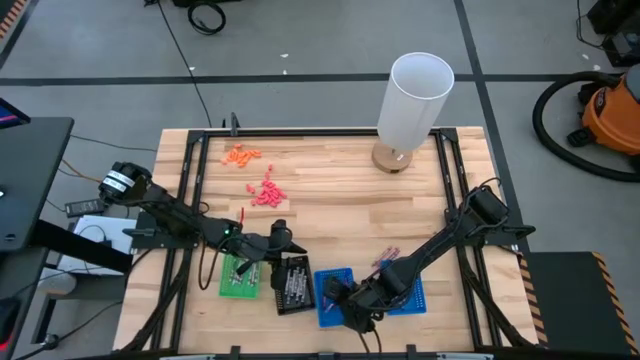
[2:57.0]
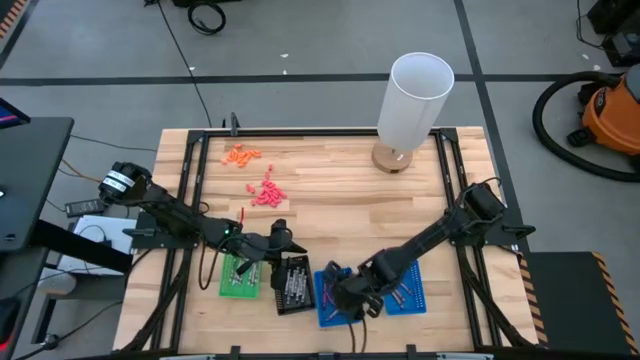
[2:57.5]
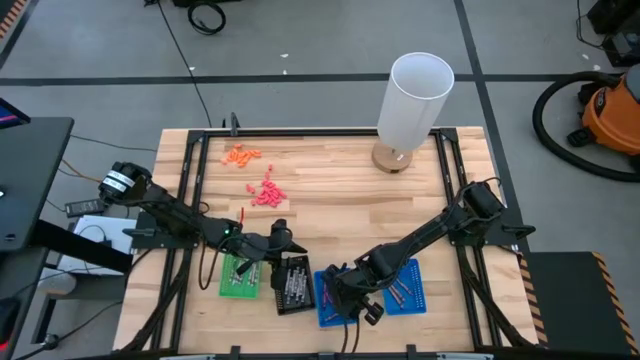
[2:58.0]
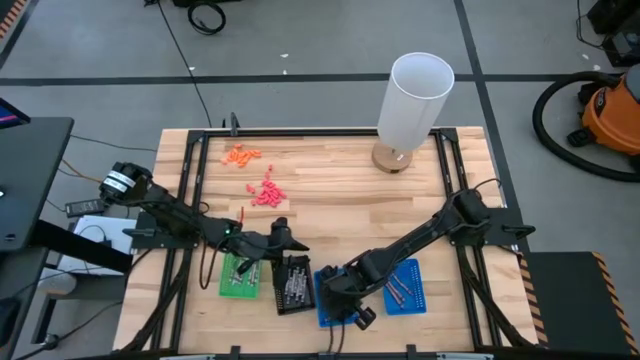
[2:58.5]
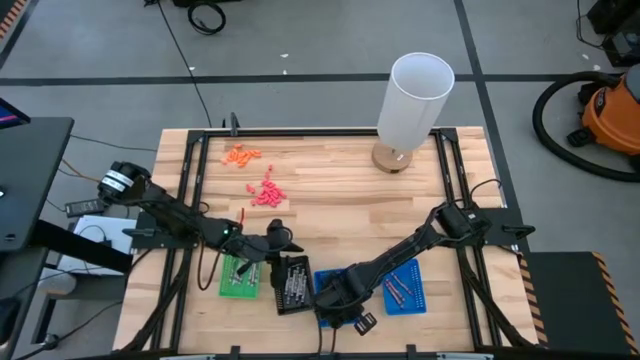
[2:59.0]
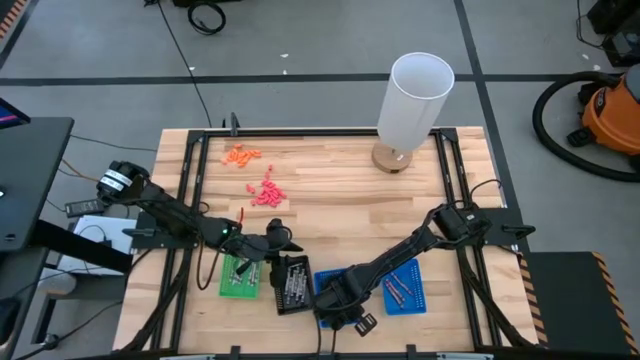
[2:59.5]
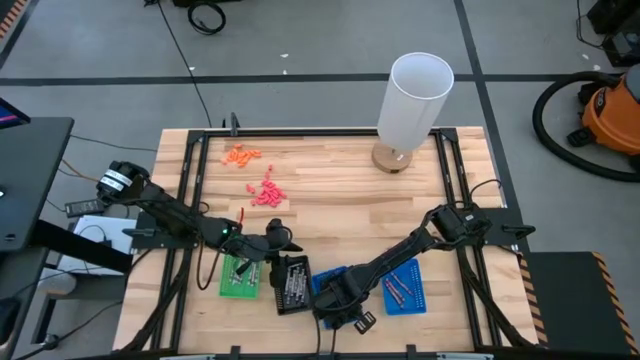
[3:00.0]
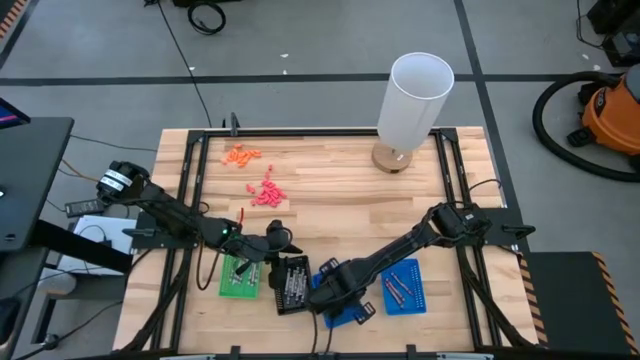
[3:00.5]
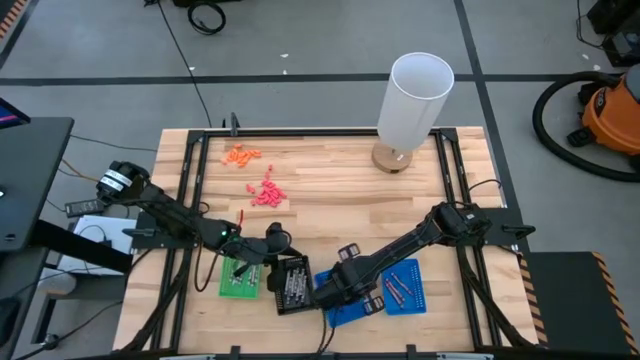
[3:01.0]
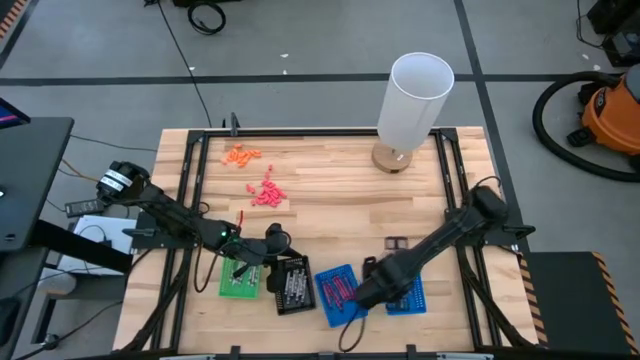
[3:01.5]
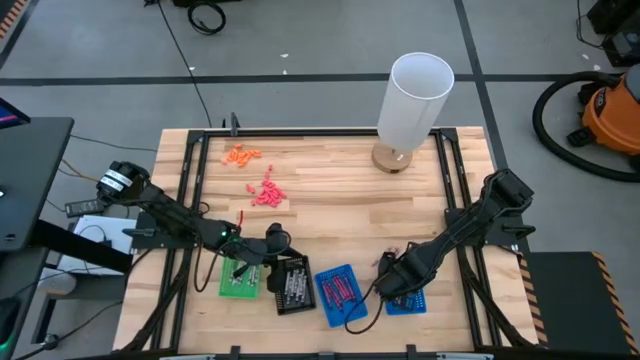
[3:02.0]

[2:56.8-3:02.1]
Task: Sort crayons
Put the pink crayon into the right blue bin

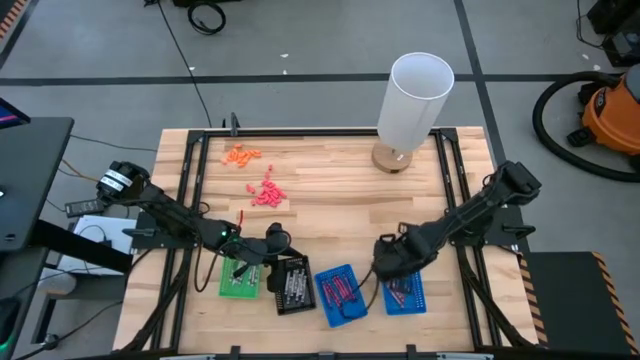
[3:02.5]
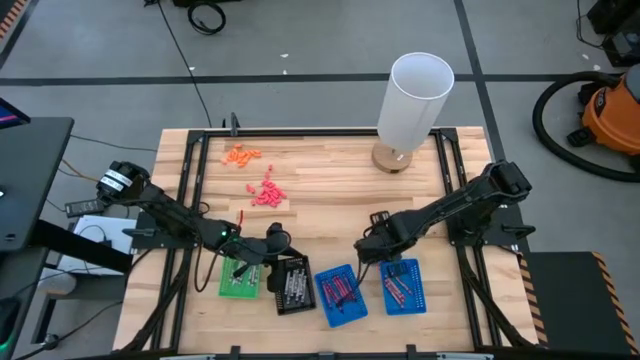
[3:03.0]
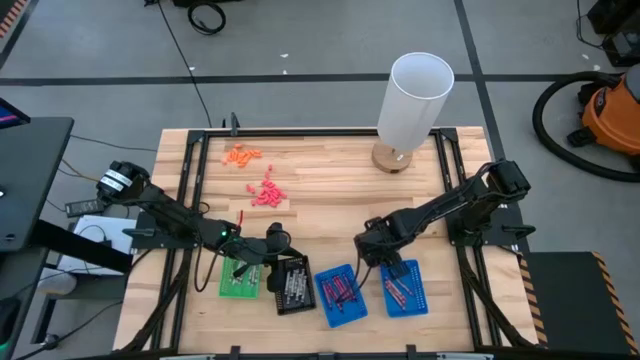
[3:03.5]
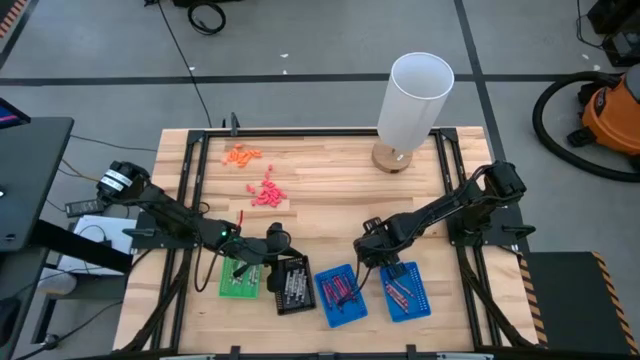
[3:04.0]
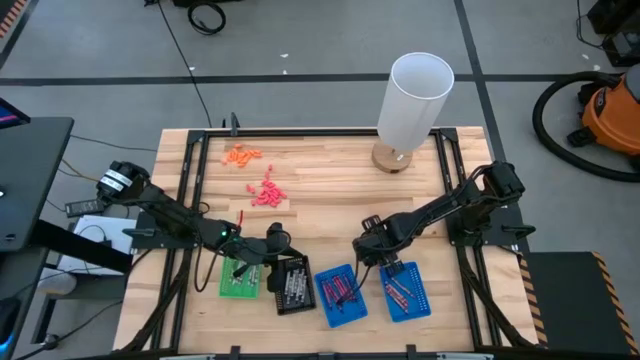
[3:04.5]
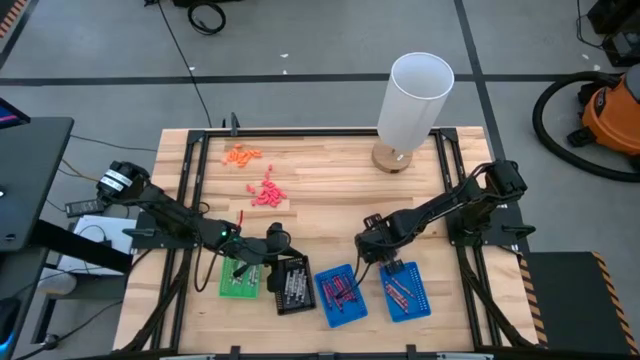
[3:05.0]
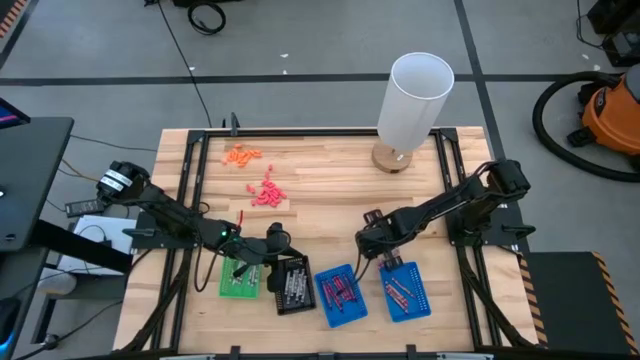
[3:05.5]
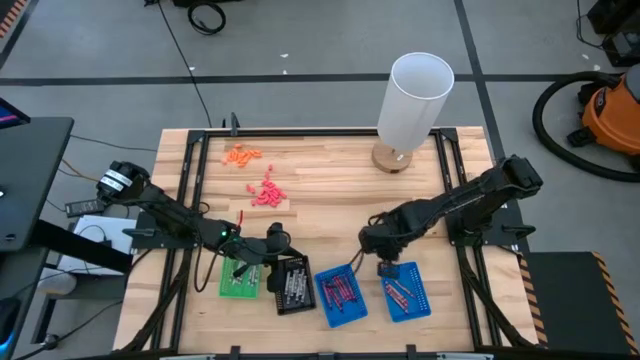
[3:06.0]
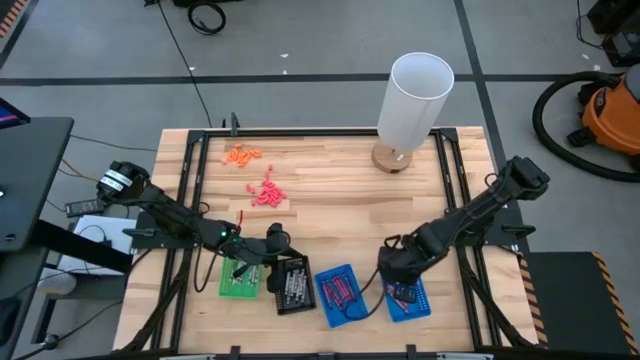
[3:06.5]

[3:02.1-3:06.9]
Put the pink crayon into the right blue bin

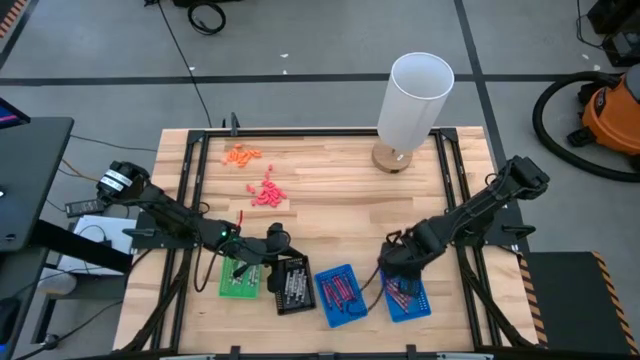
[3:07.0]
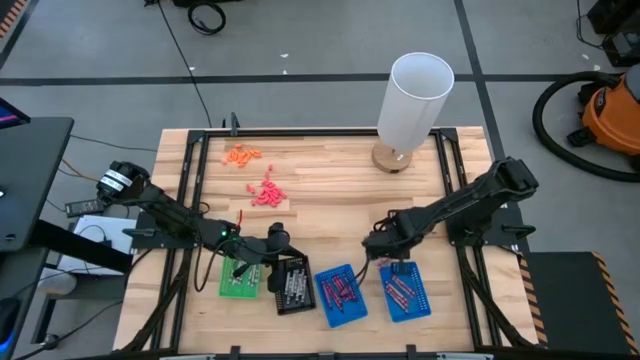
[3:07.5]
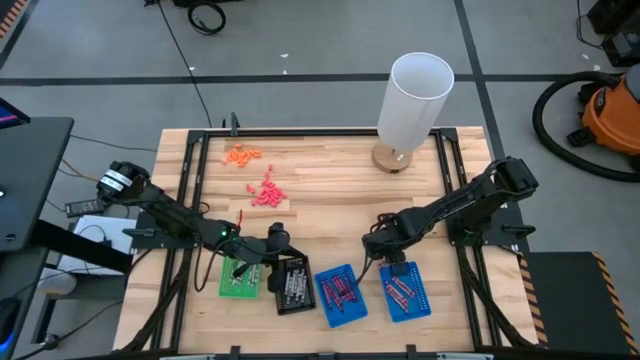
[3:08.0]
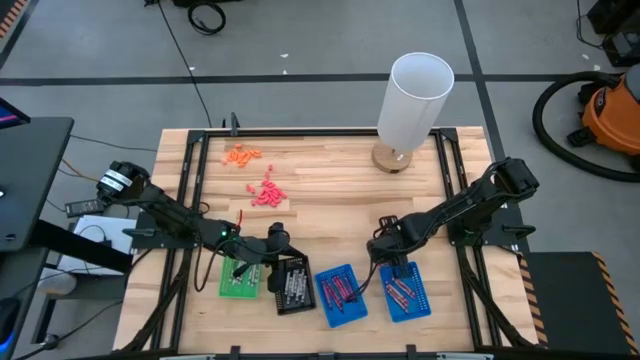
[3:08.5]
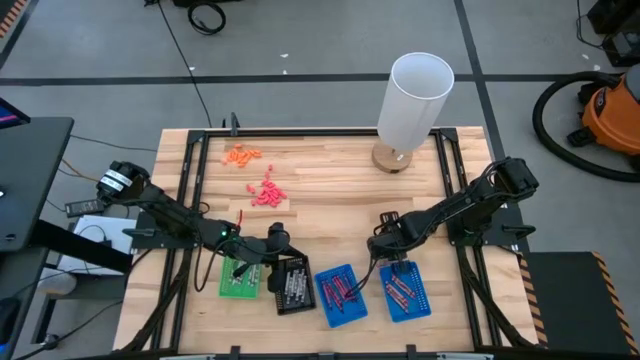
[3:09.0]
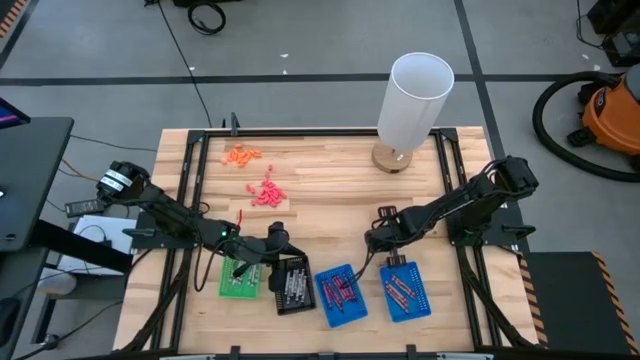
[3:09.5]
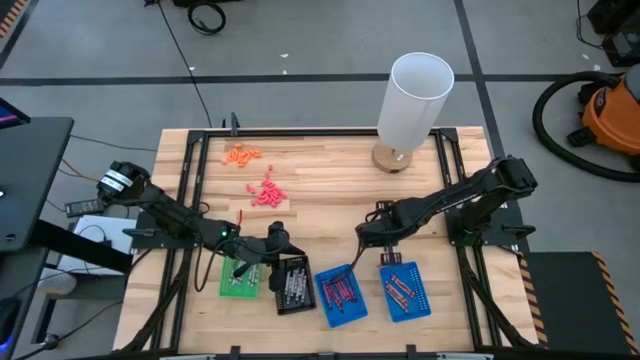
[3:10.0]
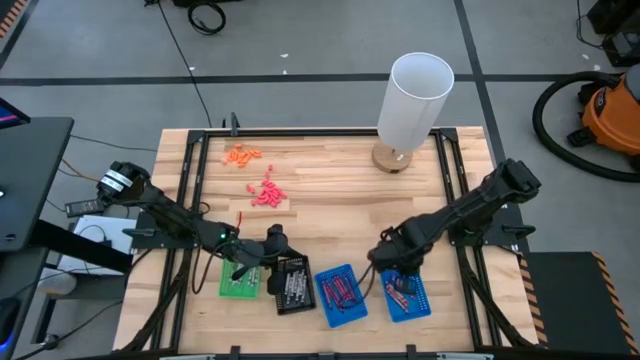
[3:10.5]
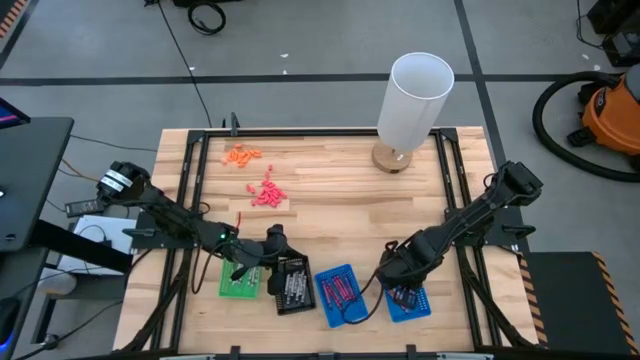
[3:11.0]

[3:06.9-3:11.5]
Put the pink crayon into the right blue bin

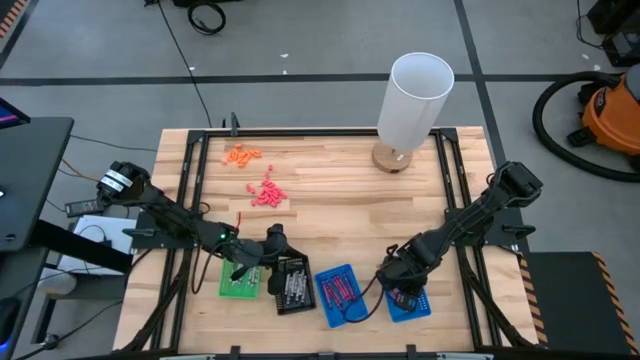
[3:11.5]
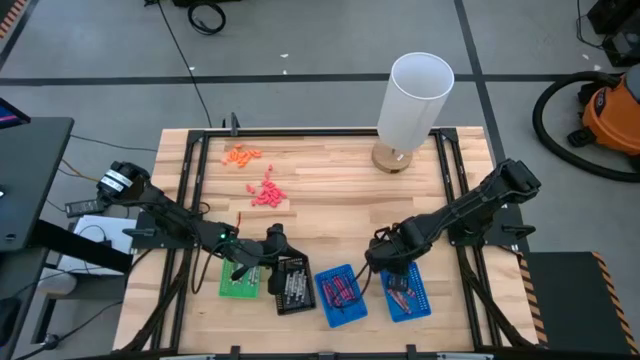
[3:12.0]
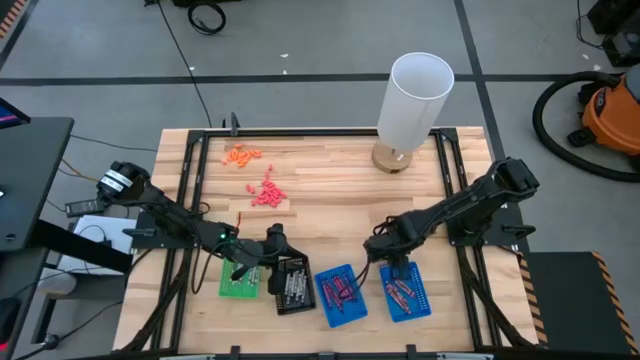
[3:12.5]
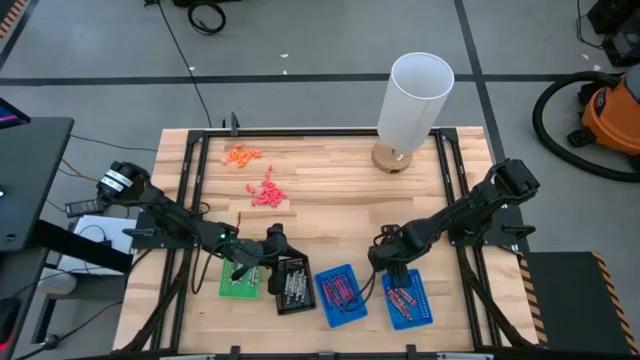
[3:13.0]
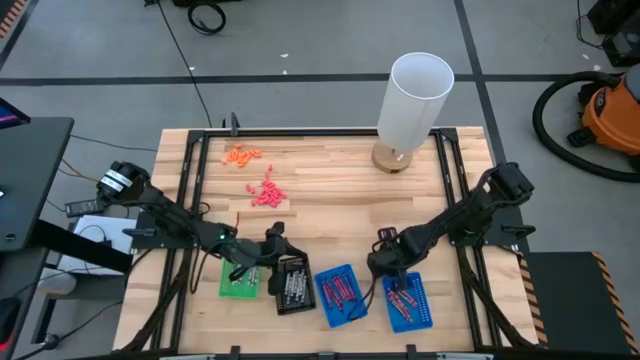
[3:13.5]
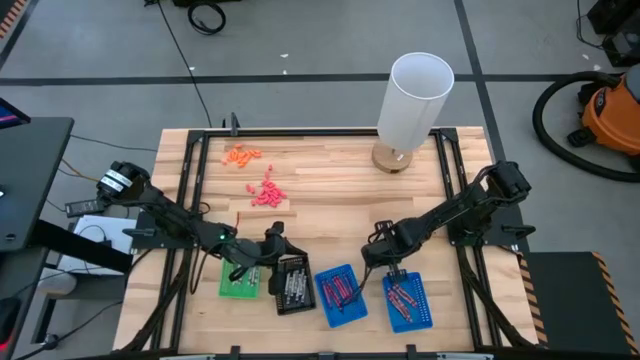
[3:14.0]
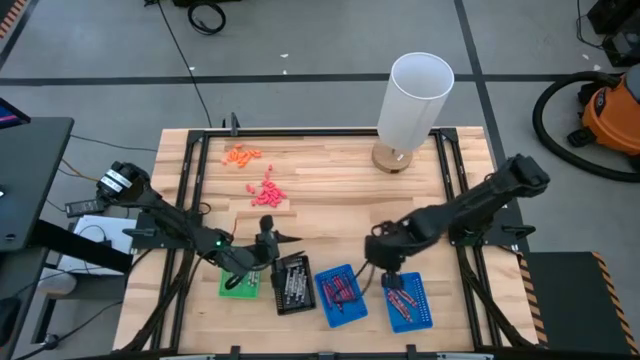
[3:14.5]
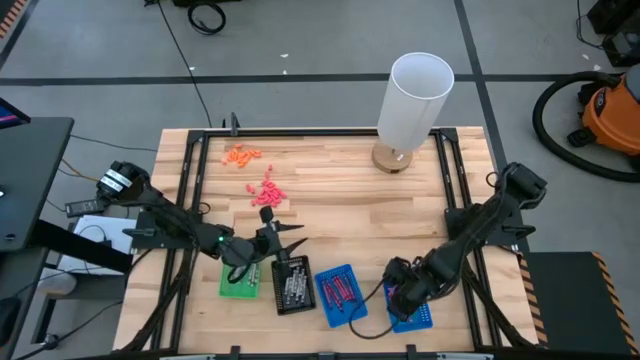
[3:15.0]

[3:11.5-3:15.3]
Put the pink crayon into the right blue bin

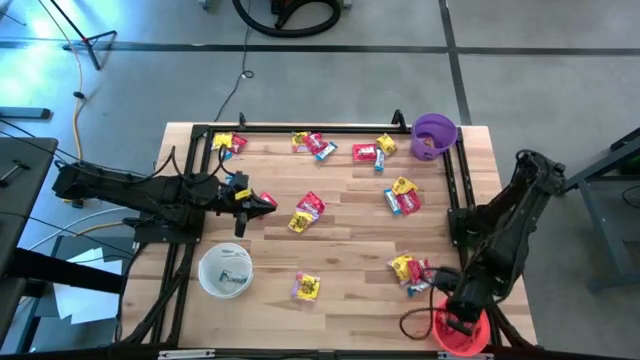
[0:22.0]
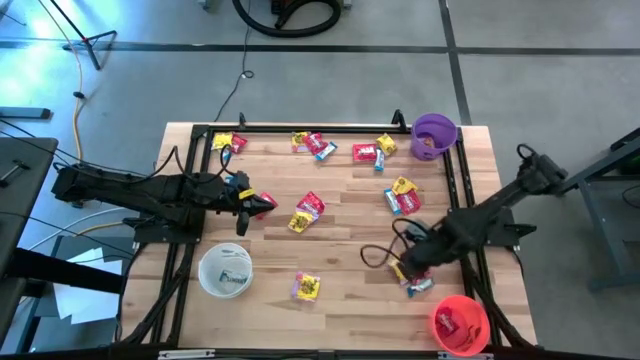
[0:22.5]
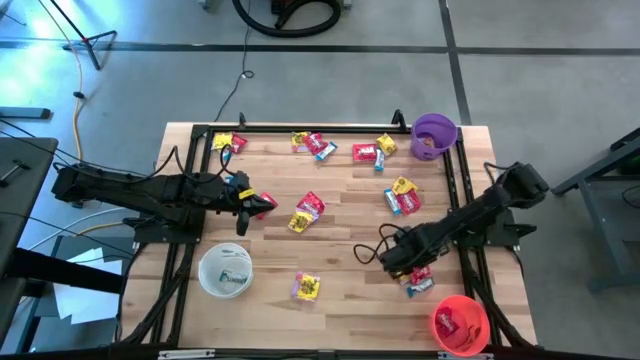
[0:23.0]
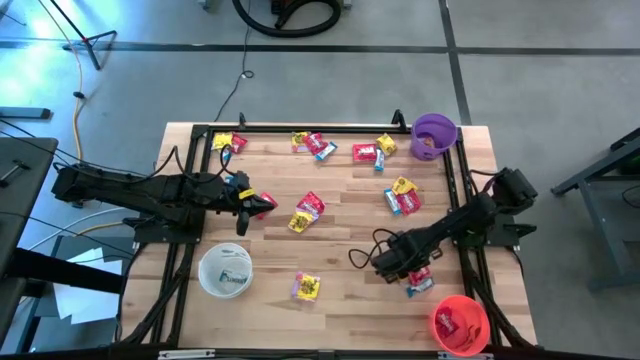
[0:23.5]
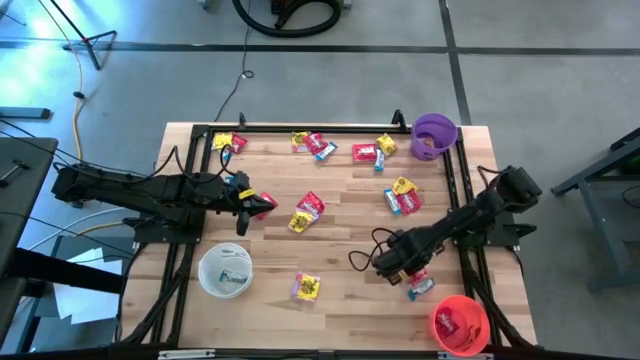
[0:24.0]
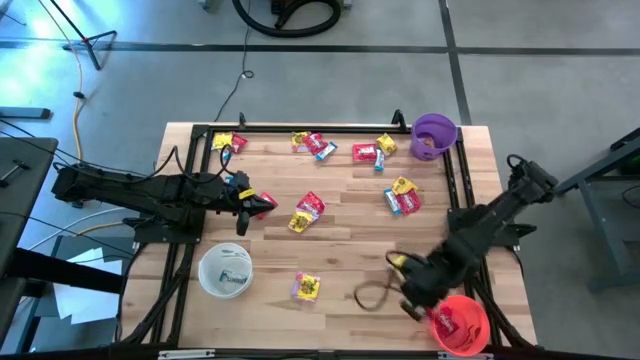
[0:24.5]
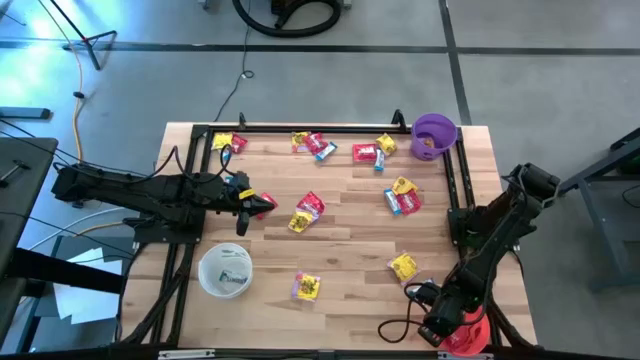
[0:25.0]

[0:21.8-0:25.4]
Task: Sort candy
Put the red candy into the orange bin
